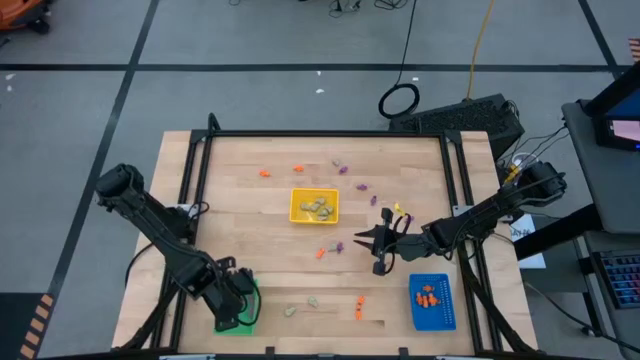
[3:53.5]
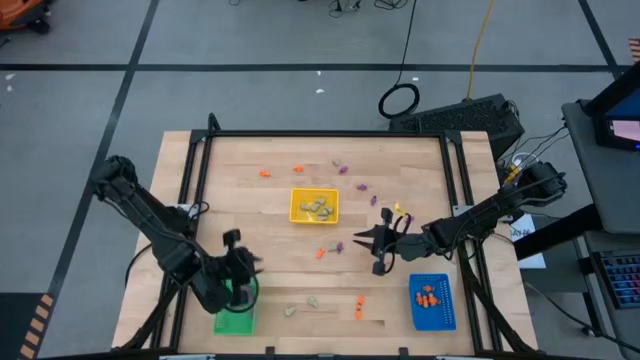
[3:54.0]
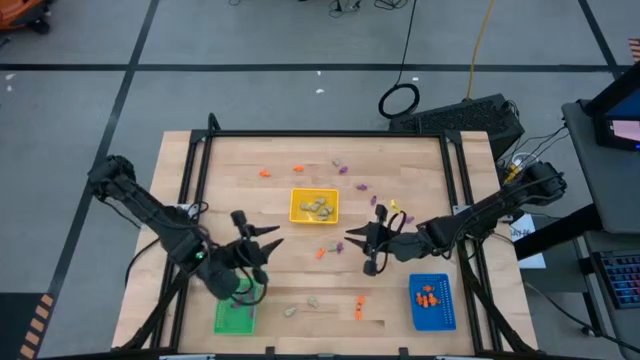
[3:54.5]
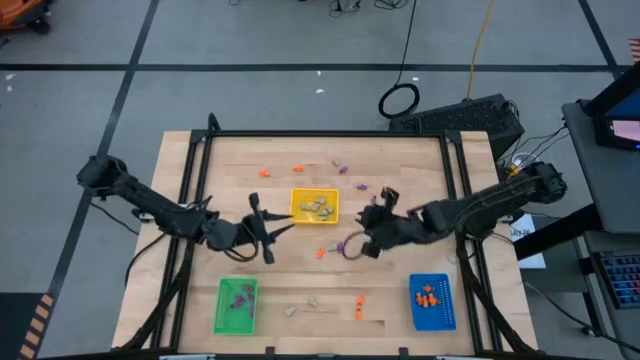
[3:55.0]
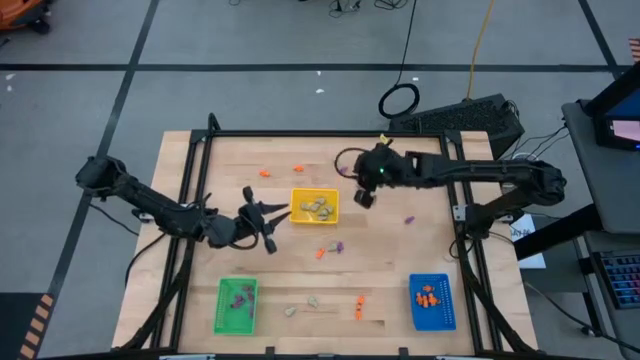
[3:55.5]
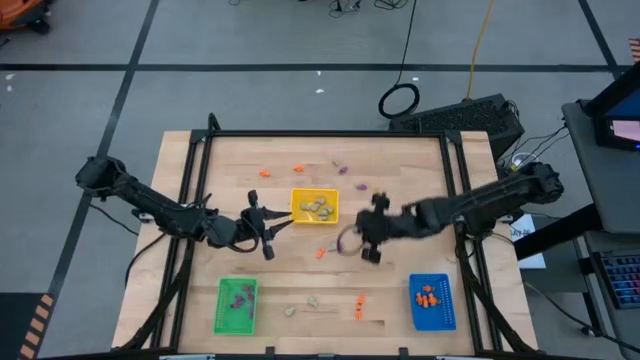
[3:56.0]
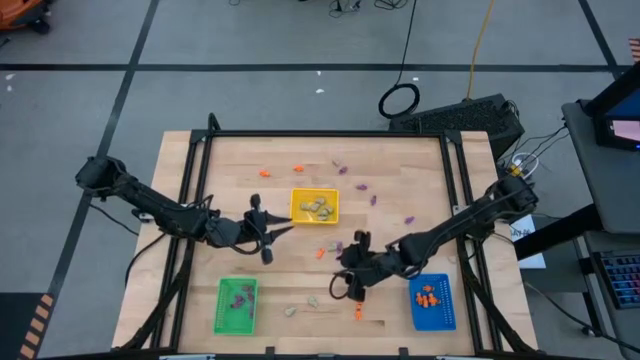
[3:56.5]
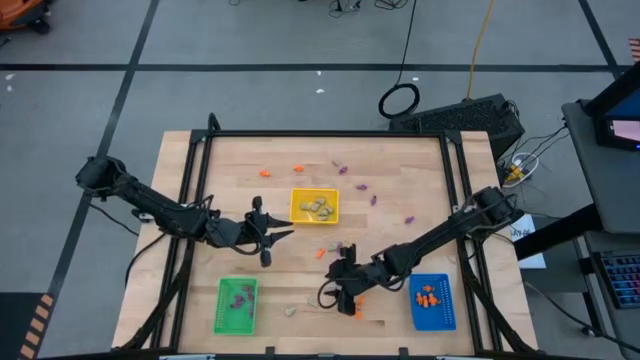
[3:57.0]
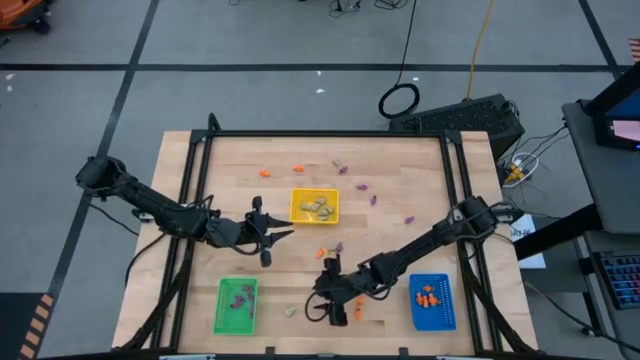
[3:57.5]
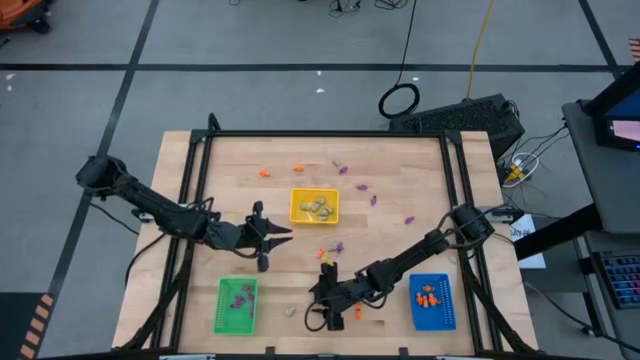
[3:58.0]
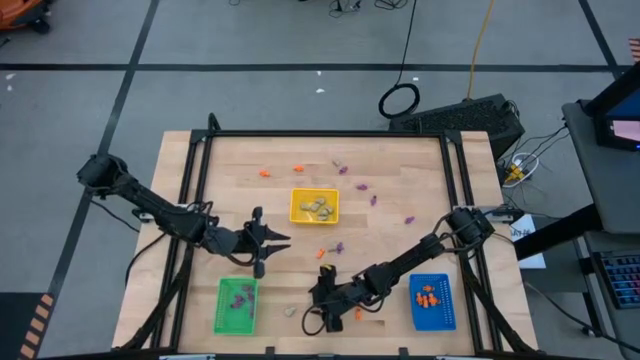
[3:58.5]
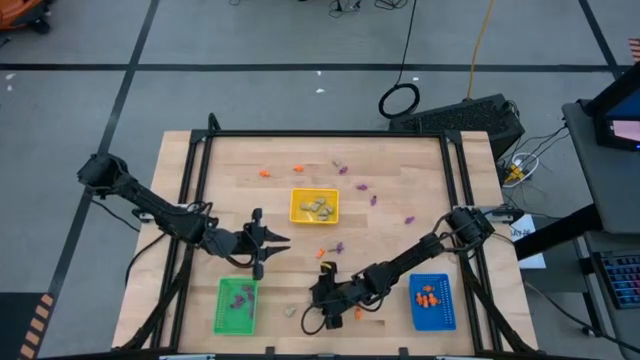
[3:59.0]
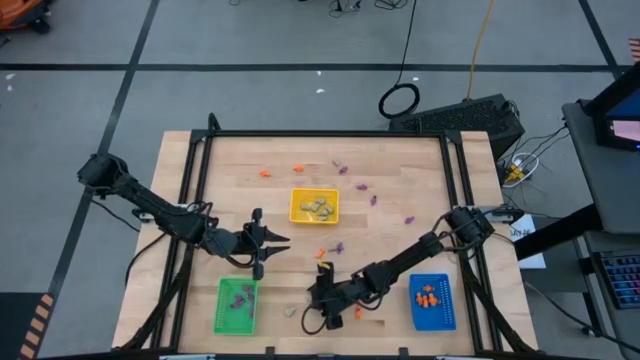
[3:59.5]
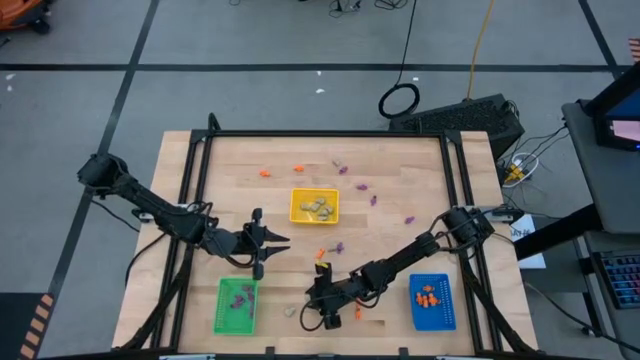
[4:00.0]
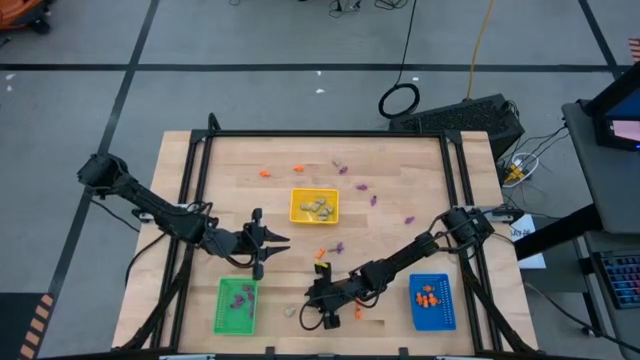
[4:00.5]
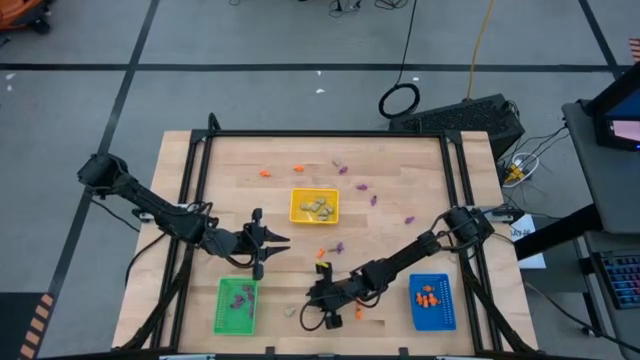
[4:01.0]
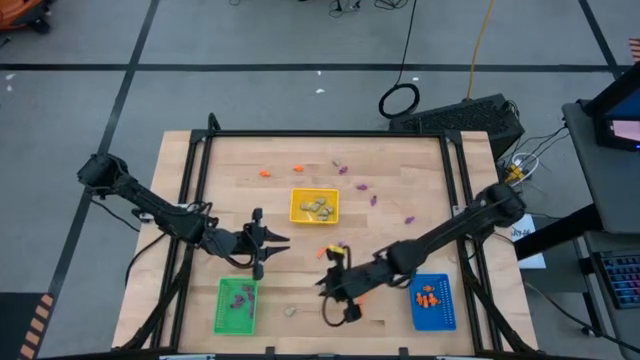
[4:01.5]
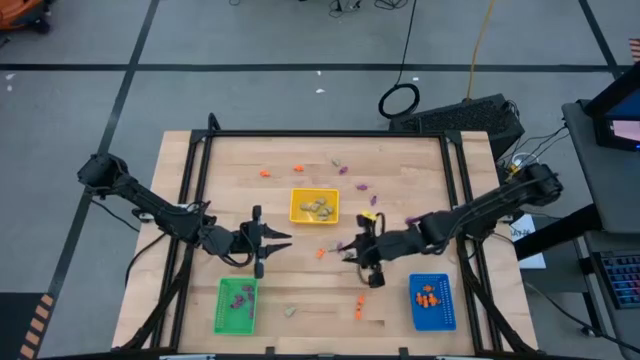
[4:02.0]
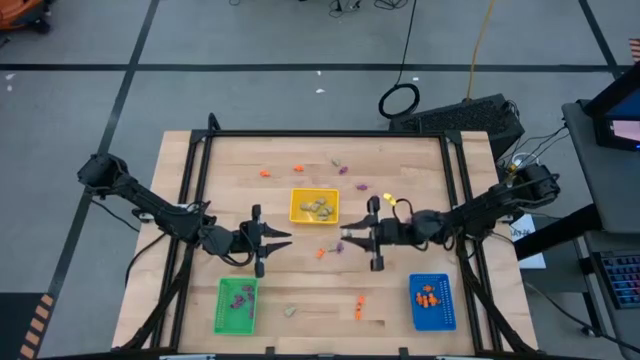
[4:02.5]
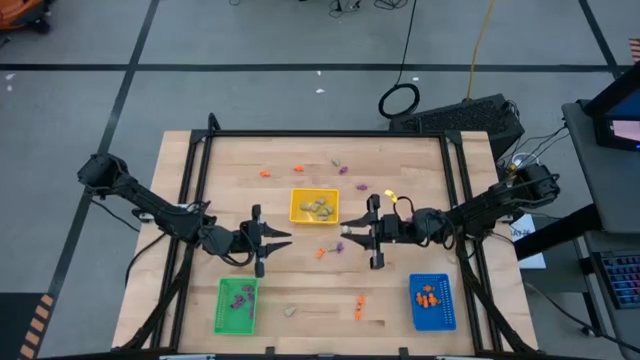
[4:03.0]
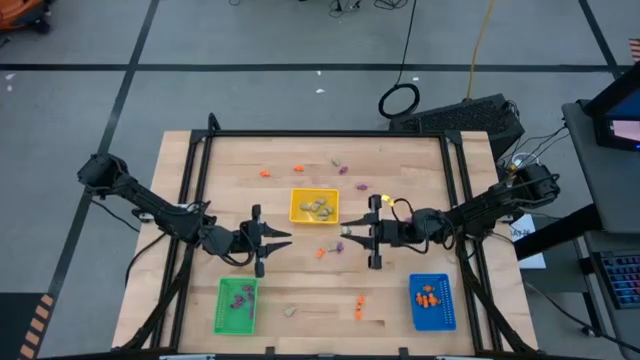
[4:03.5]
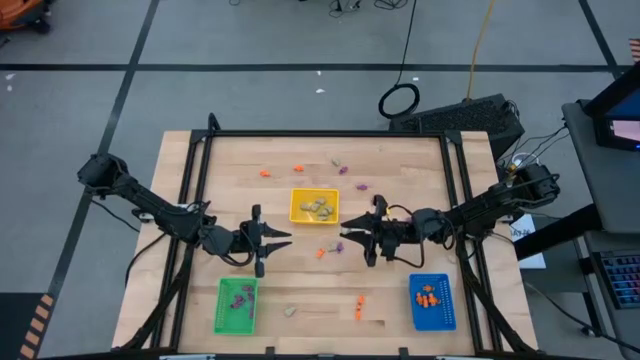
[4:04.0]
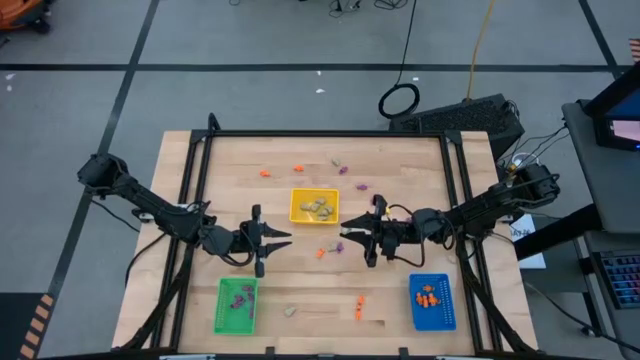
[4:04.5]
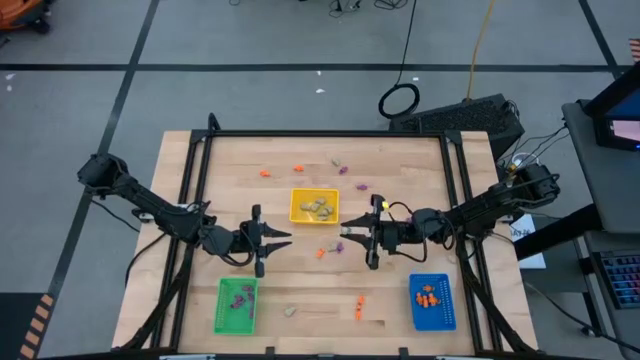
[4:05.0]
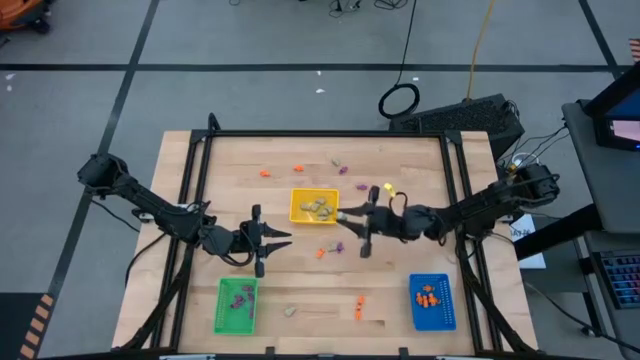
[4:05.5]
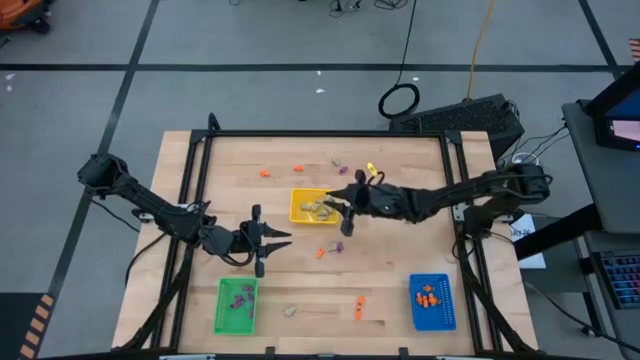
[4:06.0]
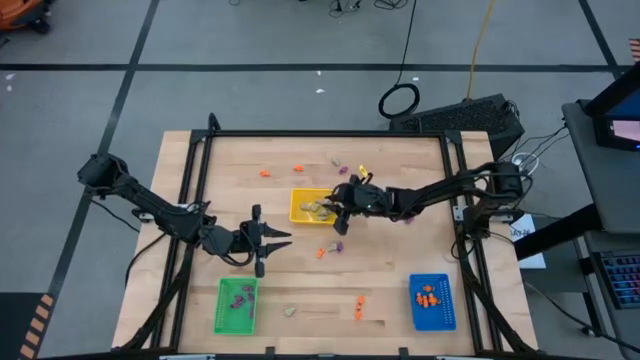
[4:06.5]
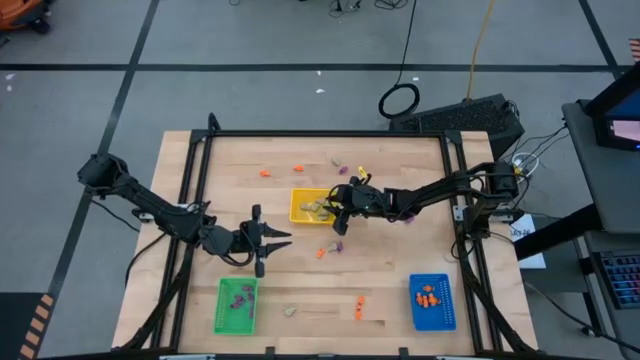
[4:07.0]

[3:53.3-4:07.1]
Task: Sort Halloween decoration
Put the white skull toy in the yellow basket

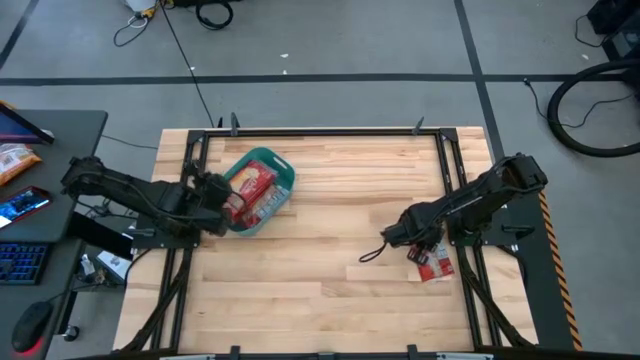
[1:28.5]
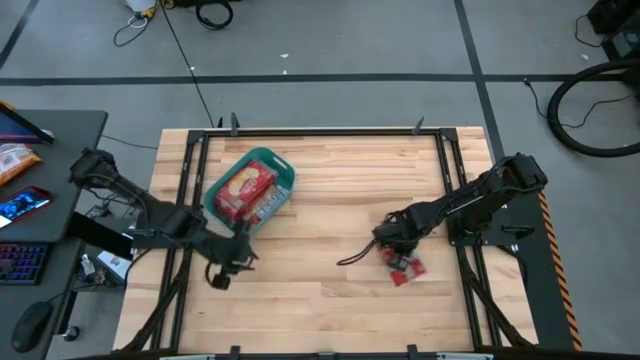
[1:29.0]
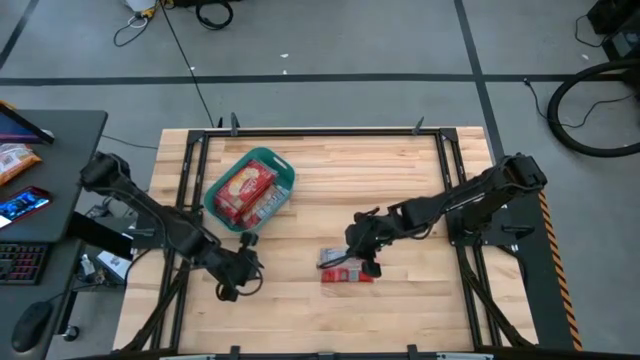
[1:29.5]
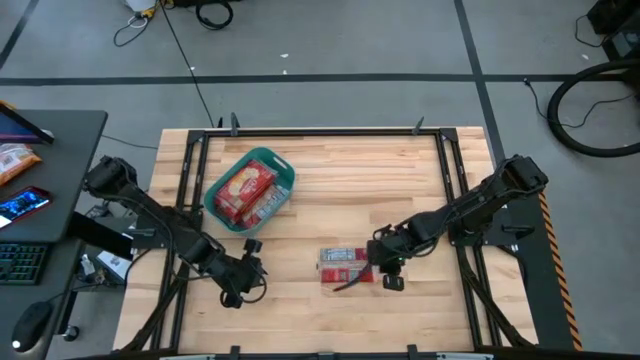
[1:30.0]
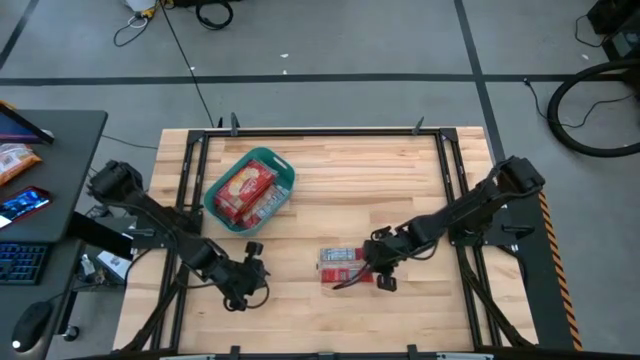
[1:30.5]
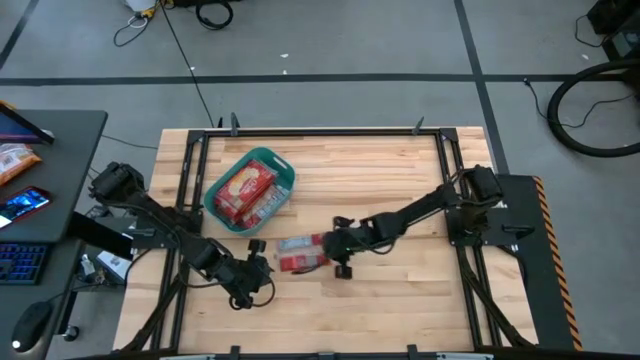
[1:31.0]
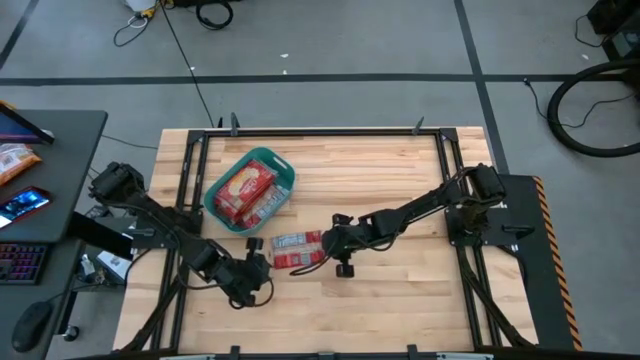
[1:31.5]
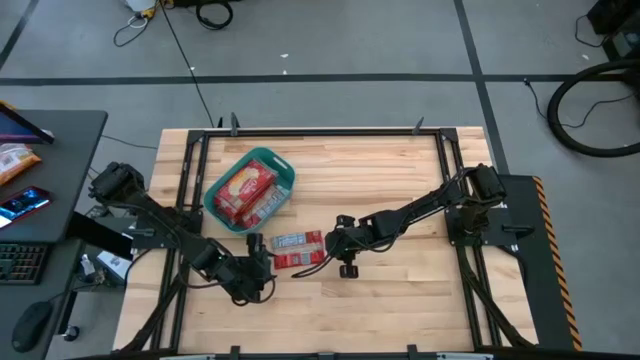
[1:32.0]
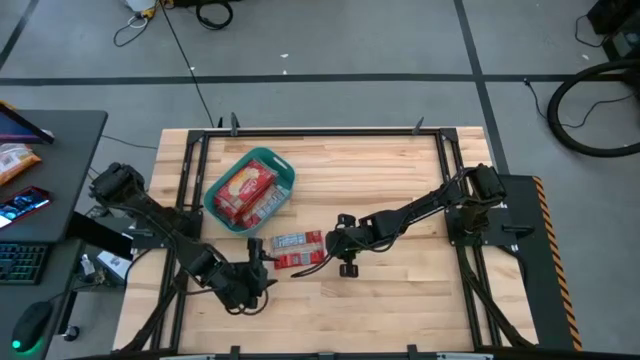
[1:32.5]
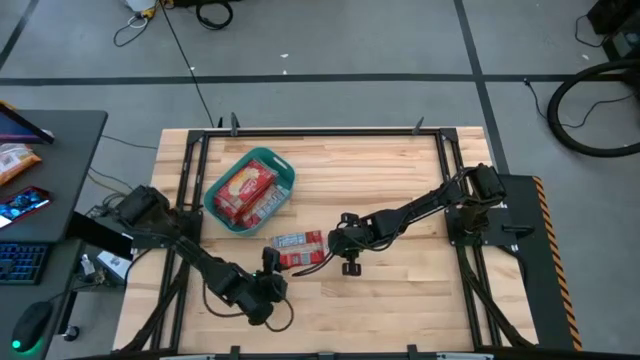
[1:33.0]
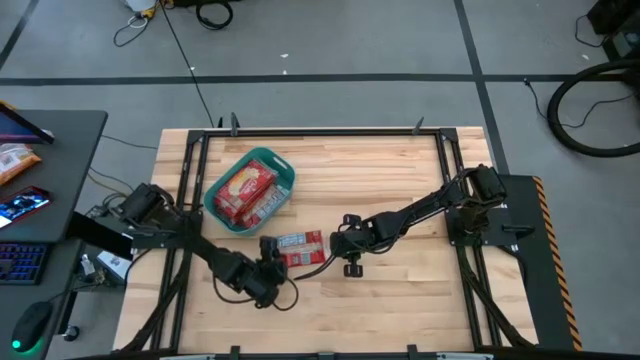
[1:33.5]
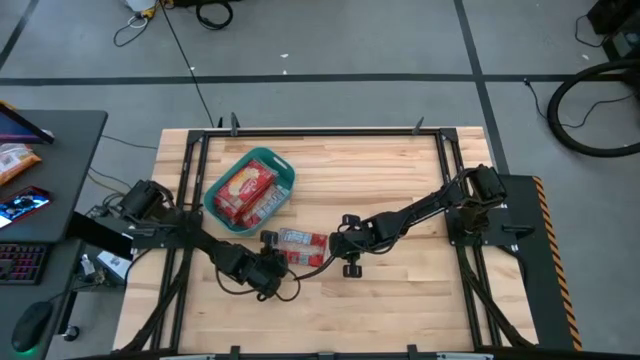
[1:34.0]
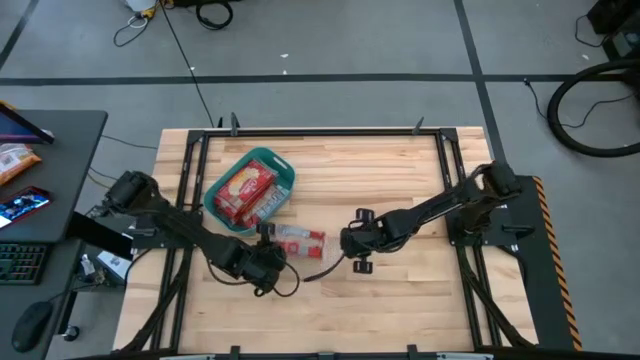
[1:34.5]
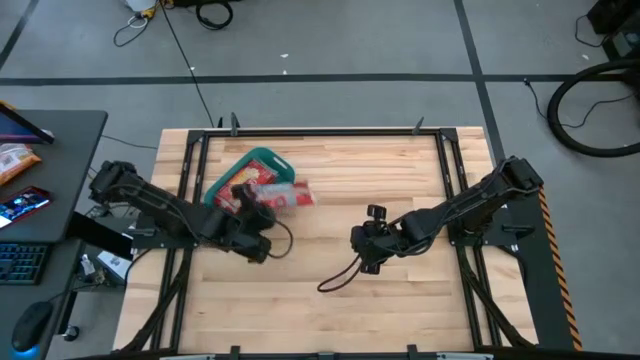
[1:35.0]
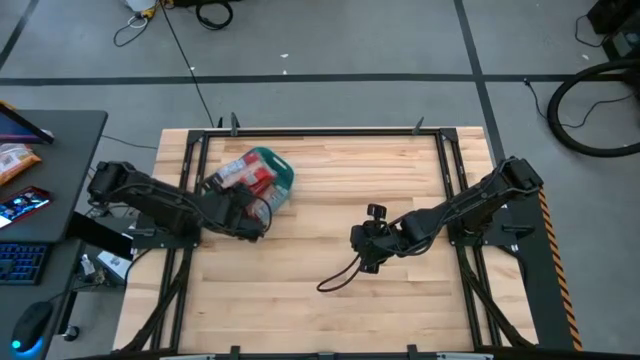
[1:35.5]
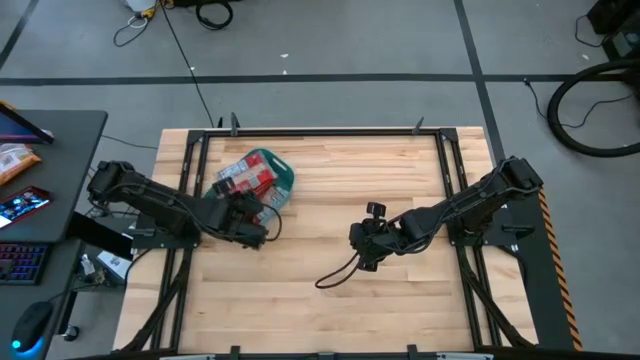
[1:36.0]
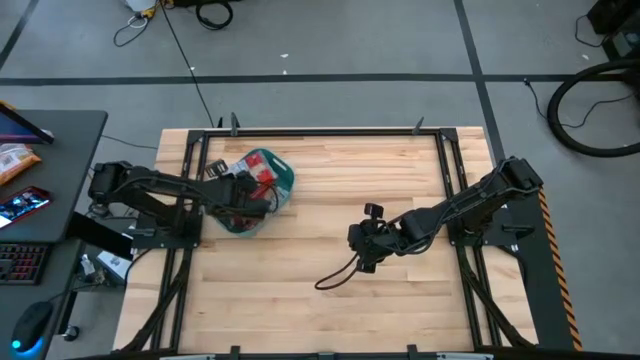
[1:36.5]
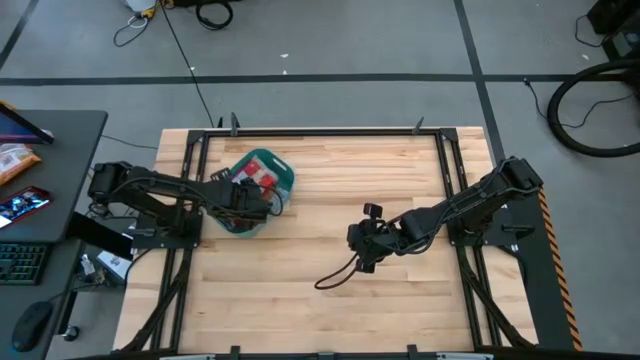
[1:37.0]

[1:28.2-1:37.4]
Task: Sort popcorn bags into baskets
Put the red popcorn bag into the green bin
